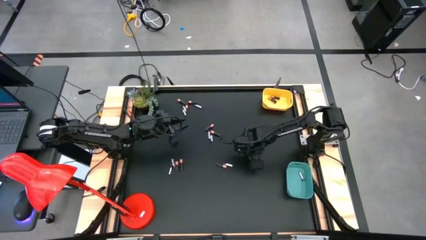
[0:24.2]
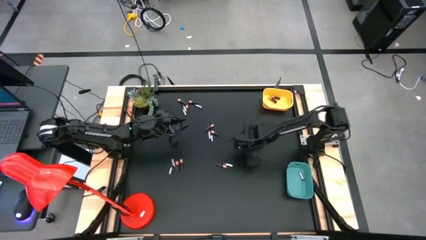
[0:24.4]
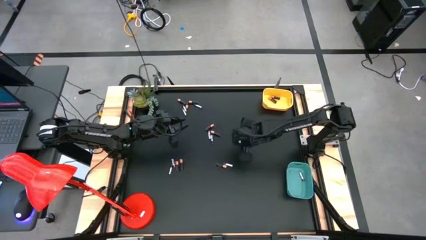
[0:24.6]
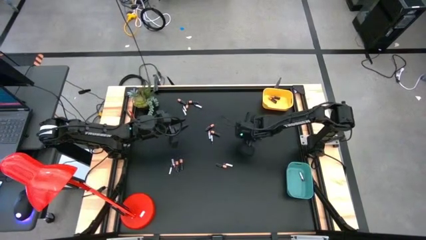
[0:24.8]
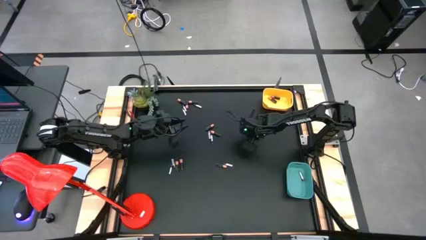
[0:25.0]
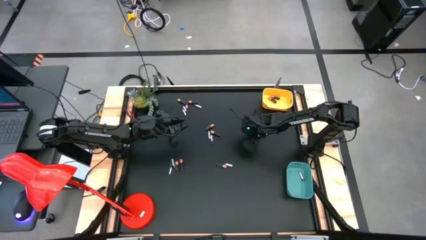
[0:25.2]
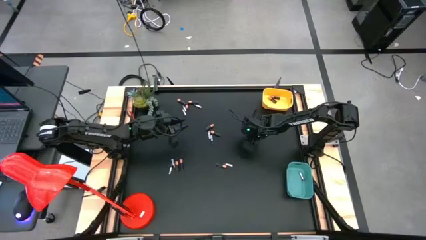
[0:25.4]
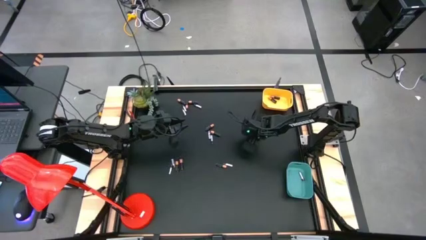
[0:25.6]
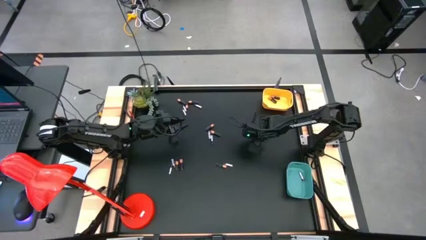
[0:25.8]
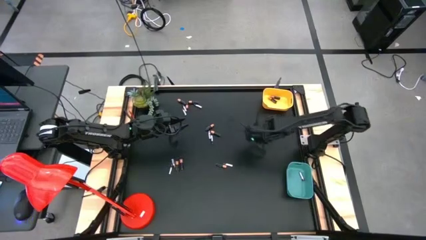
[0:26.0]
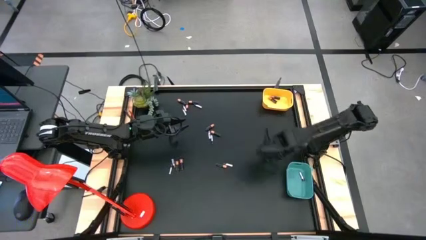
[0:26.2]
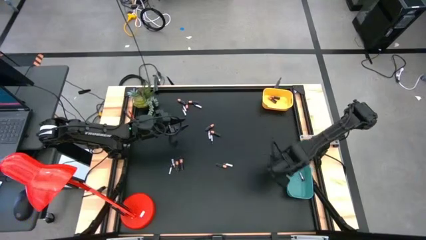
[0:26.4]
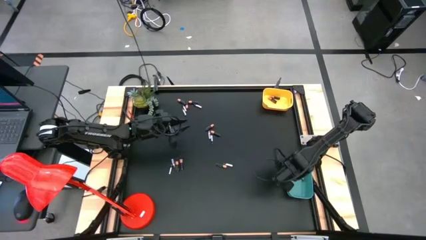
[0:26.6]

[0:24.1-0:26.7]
Task: Sort batteries
Put the silver battery into the green bin

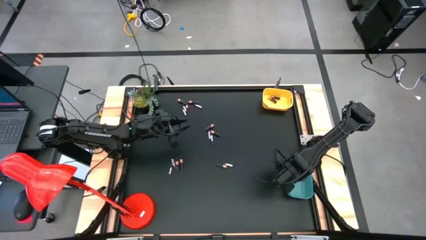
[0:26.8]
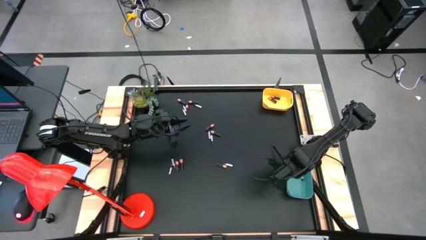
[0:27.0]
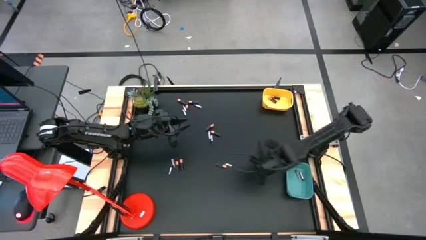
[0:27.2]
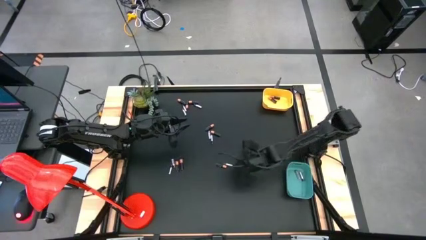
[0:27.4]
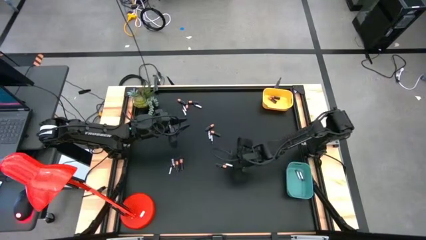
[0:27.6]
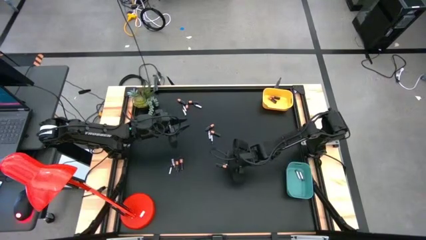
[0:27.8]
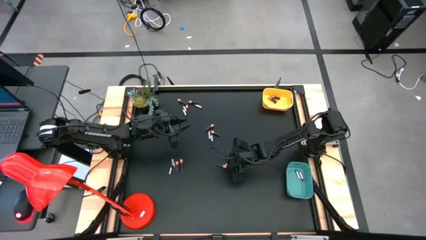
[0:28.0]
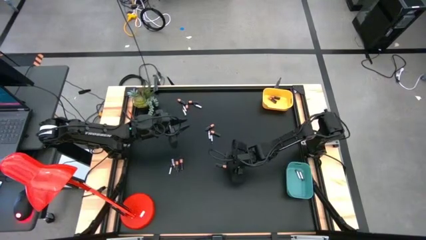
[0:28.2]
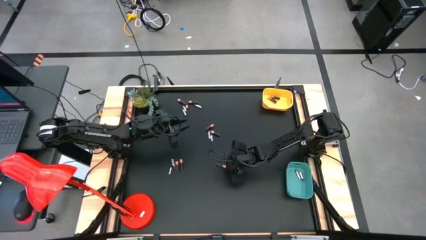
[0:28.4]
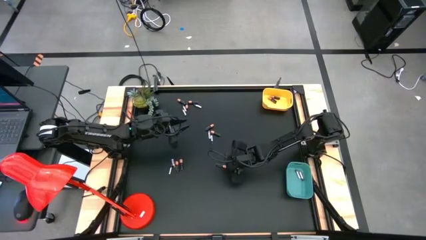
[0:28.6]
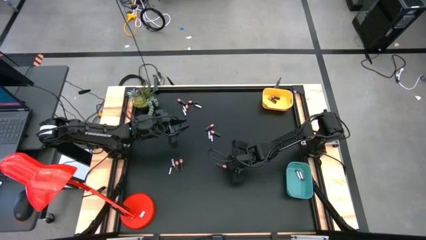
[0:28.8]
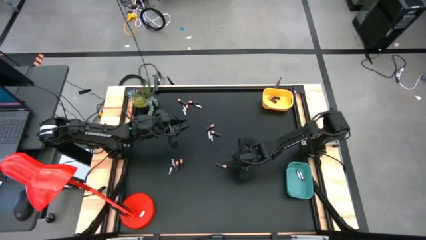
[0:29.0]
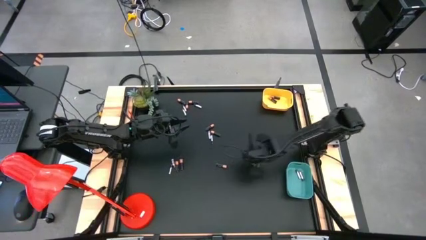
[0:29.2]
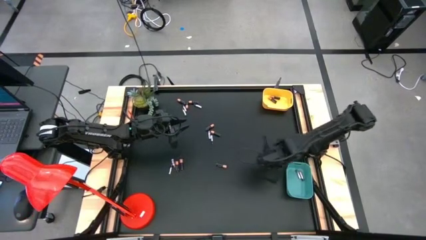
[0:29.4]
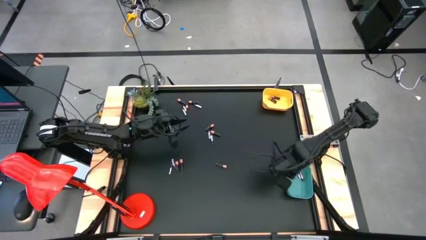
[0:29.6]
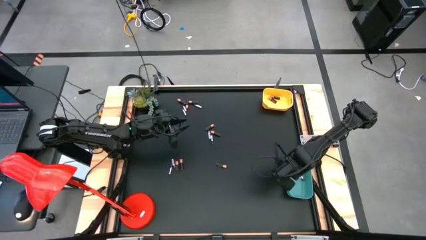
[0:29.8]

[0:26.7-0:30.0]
Put the silver battery into the green bin

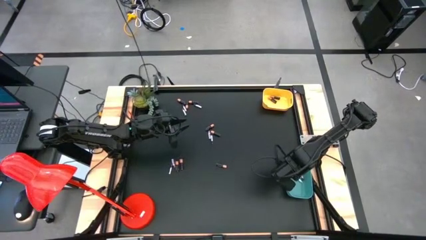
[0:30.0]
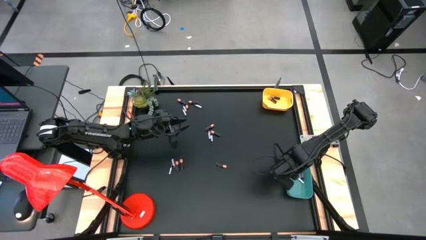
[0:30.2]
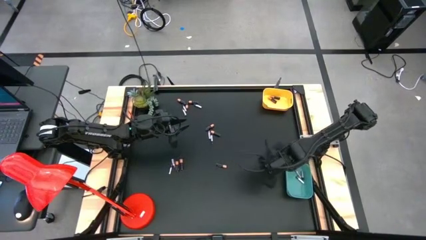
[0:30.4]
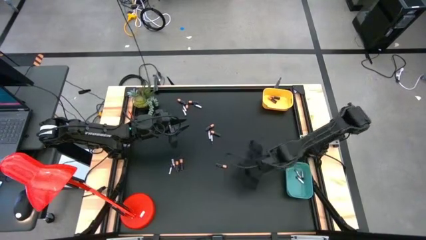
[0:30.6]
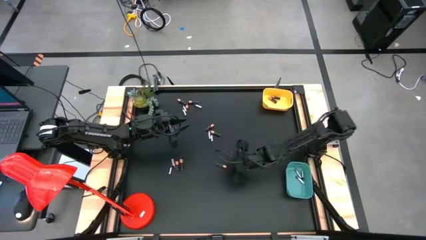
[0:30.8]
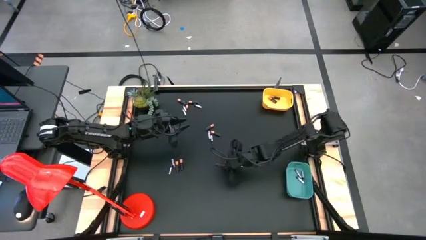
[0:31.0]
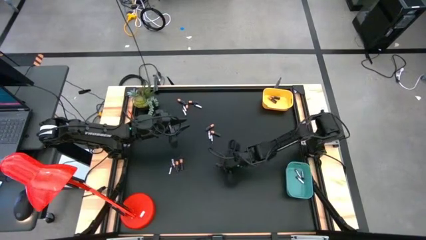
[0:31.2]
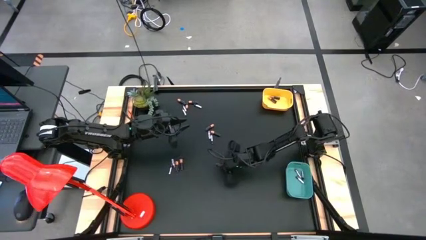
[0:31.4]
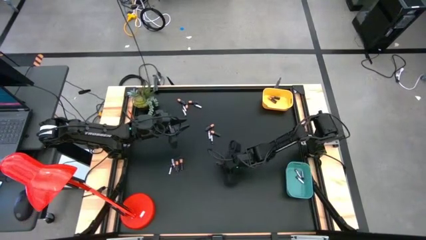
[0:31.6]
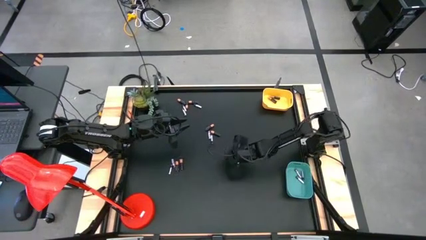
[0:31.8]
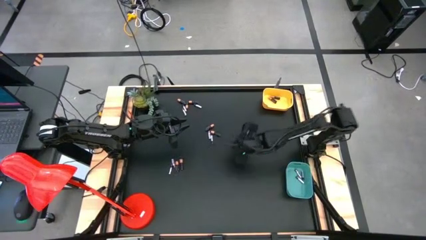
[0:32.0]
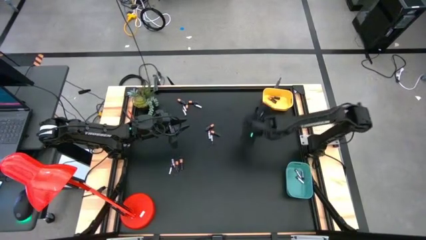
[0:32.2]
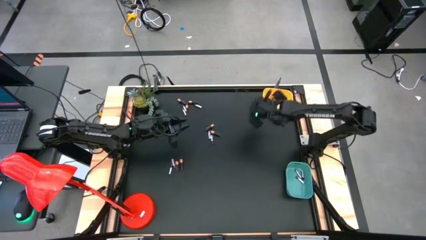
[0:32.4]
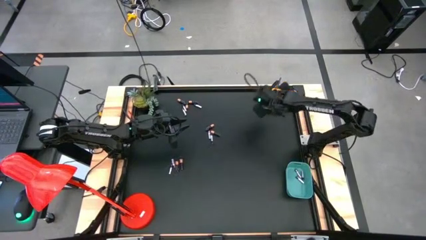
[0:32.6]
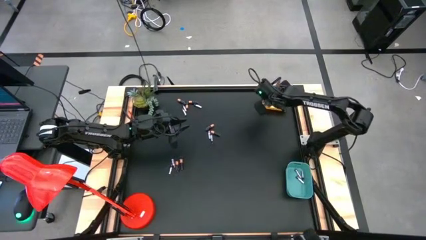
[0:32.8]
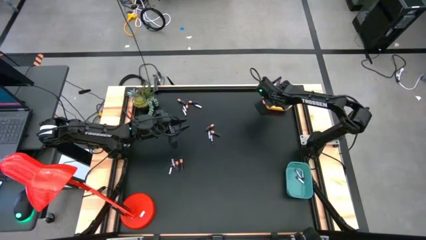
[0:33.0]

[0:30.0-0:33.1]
Put the black battery into the yellow bin

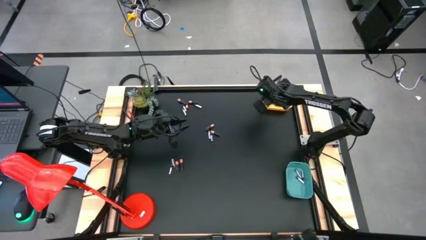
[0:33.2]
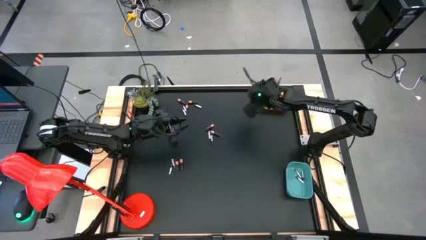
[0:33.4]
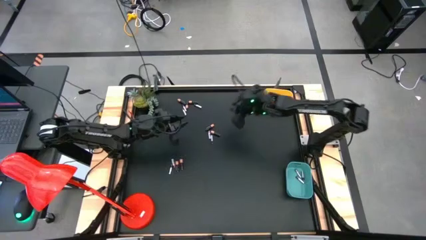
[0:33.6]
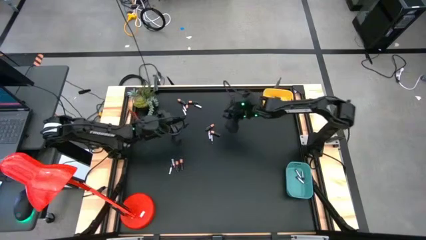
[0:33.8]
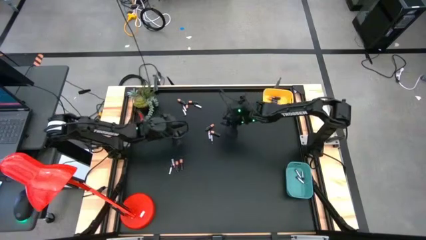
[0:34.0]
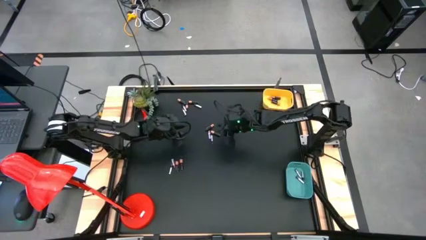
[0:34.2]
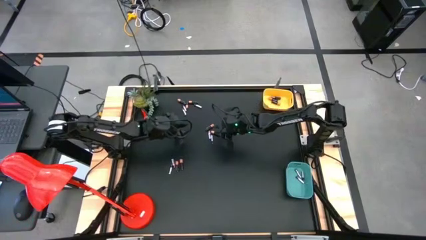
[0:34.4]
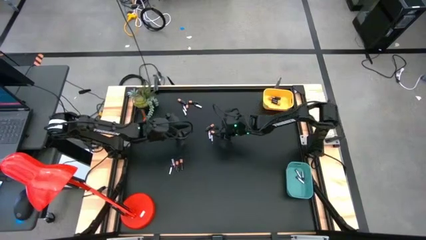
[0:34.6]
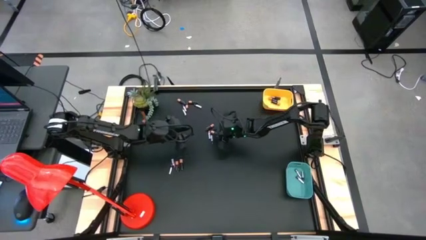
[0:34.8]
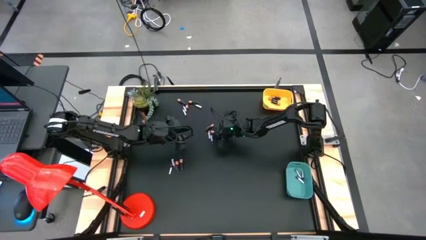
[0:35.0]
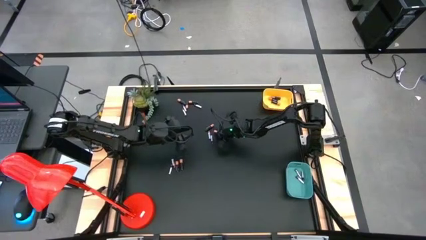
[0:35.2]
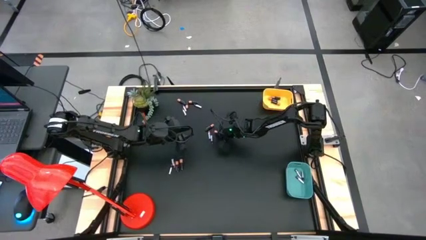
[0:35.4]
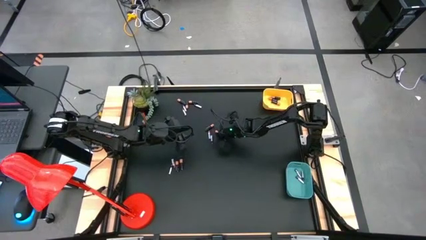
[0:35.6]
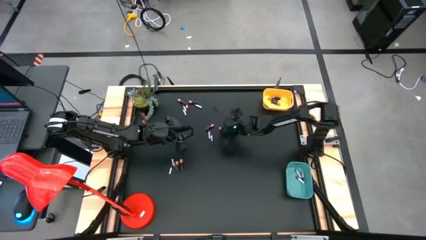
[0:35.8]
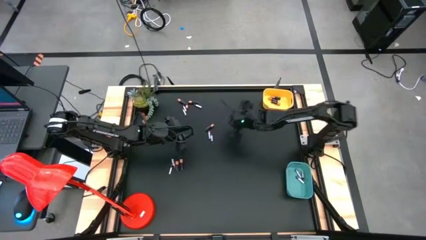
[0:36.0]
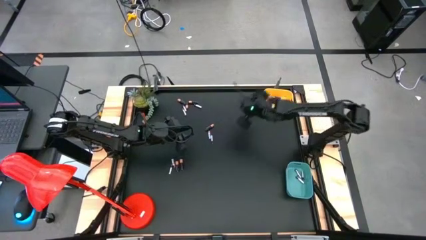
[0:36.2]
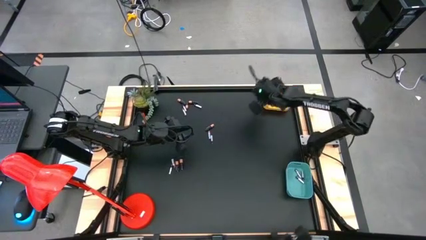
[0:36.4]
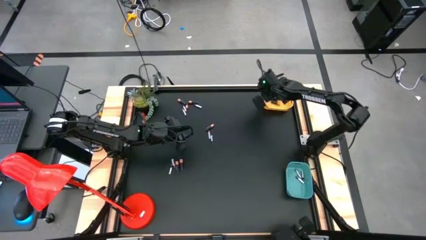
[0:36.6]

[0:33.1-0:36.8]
Put the black battery into the yellow bin

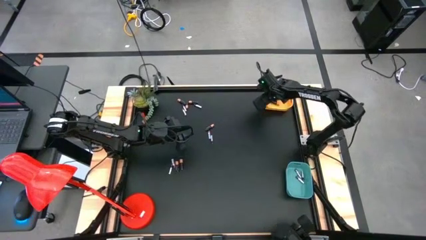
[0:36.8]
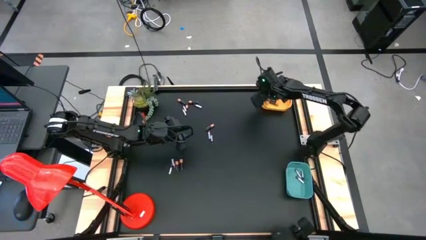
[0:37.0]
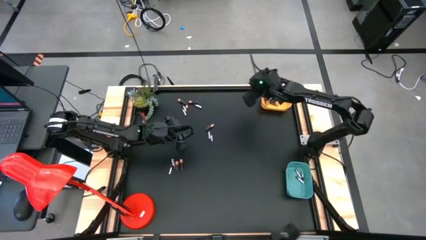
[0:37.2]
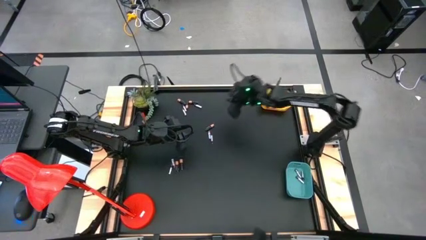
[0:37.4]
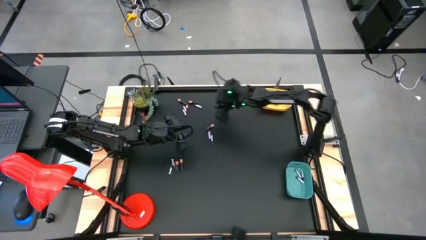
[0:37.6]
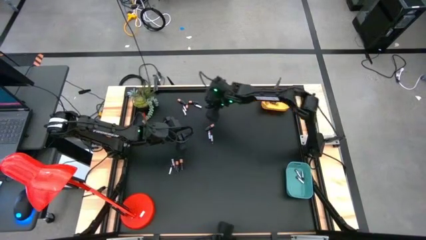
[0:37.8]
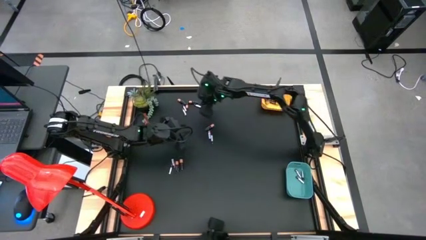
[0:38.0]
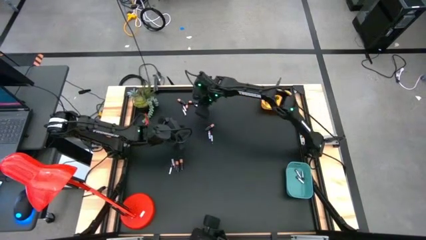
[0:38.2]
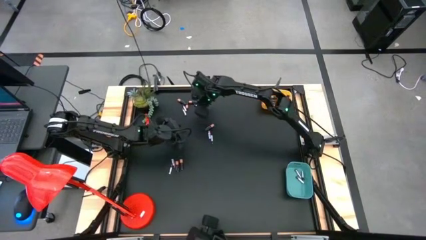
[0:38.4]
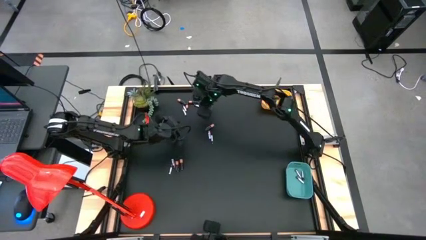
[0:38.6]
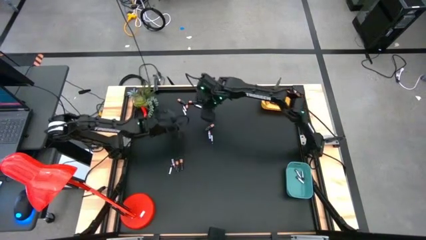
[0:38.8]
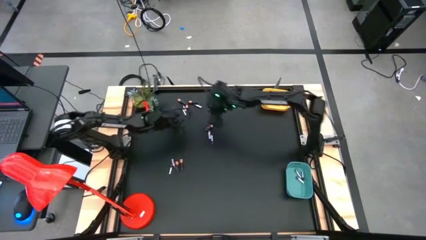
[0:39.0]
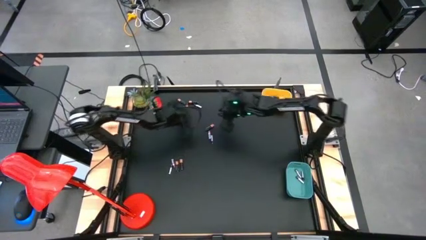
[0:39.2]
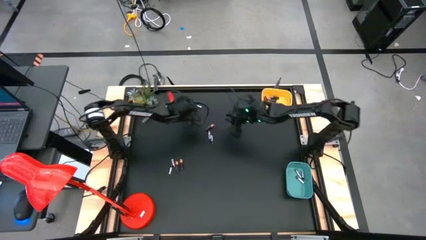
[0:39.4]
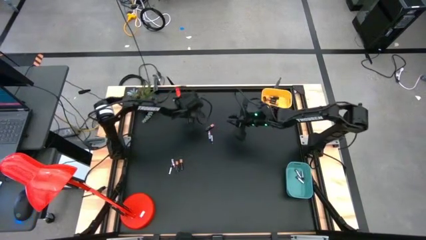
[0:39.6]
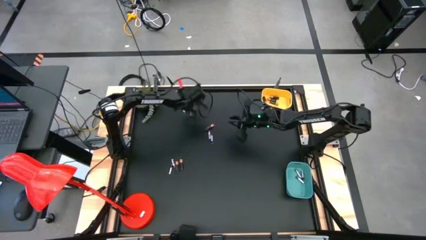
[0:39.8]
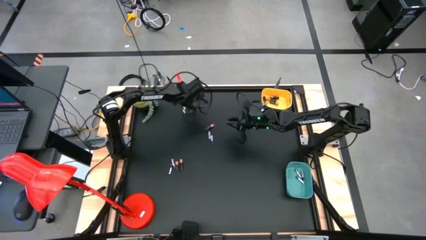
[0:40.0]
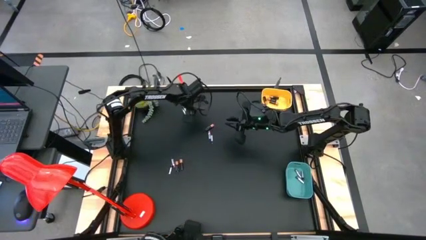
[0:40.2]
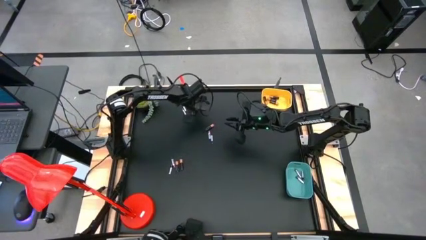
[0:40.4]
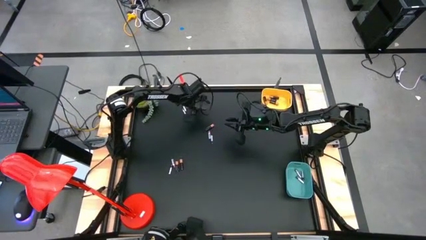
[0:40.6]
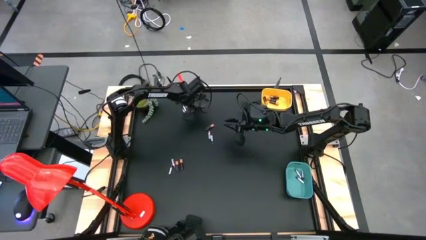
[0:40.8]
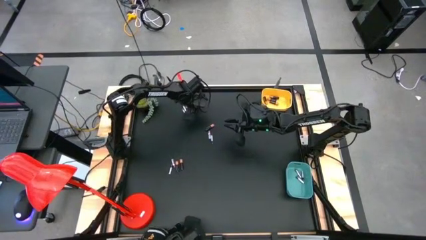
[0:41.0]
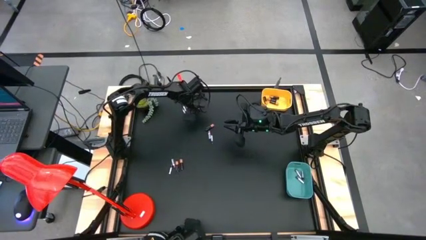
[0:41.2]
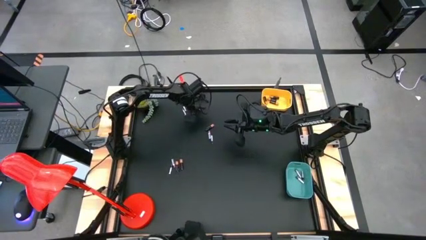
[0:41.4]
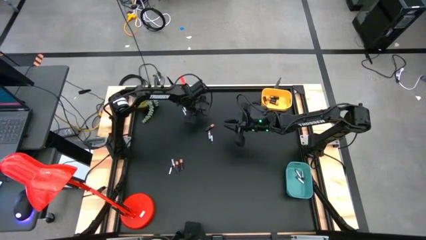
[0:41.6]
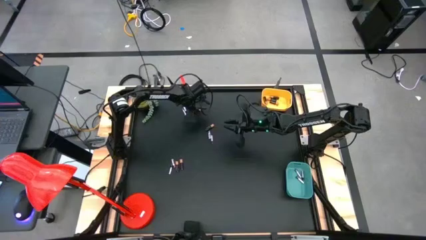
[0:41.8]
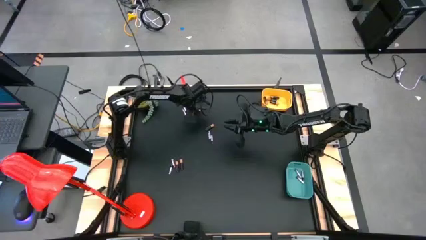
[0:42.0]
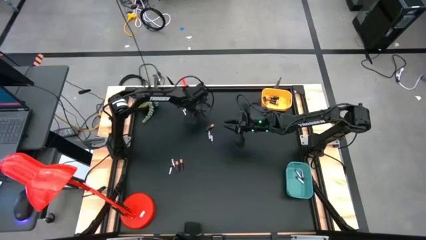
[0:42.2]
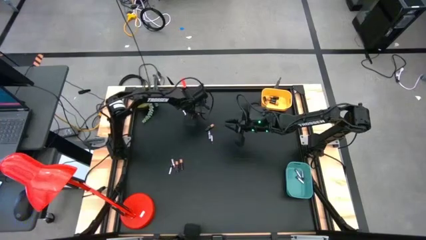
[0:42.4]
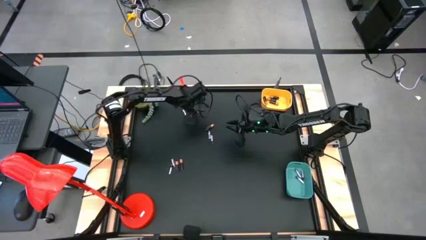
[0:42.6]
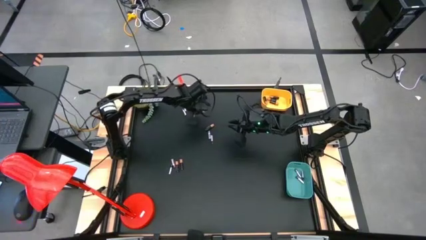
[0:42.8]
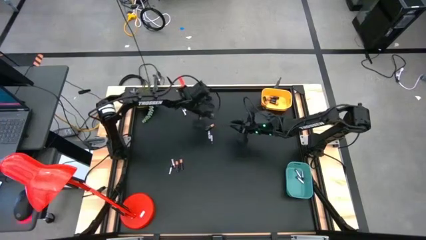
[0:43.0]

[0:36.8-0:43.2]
Put the silver battery into the green bin
